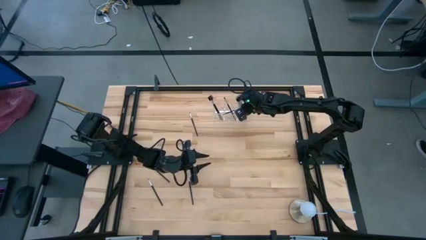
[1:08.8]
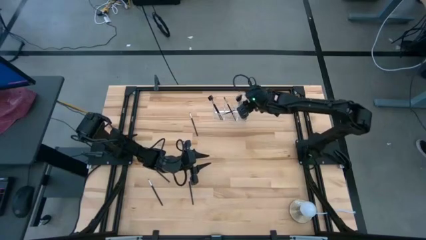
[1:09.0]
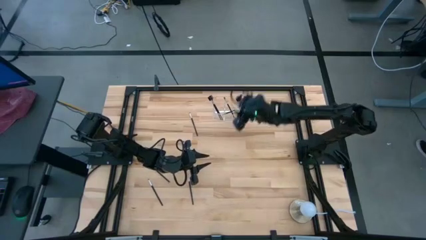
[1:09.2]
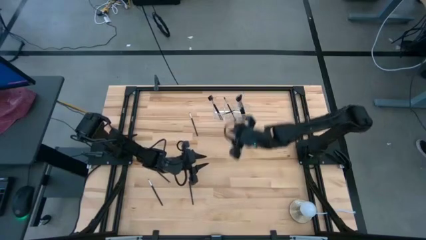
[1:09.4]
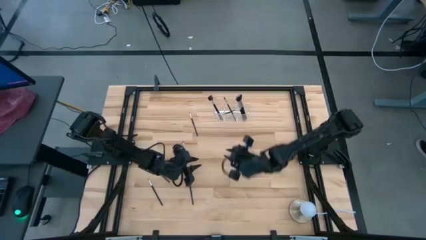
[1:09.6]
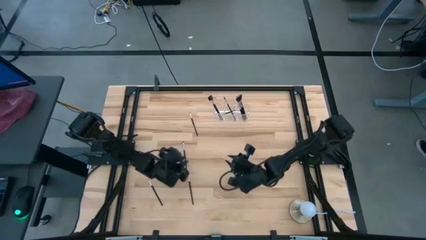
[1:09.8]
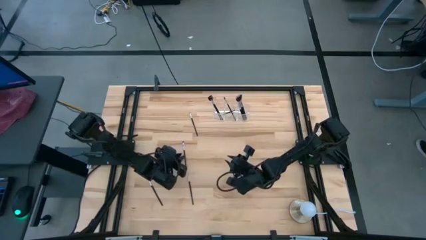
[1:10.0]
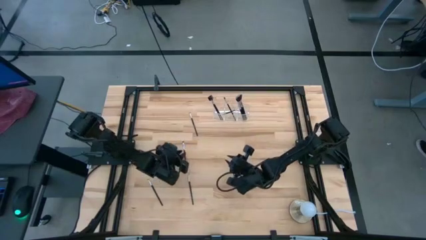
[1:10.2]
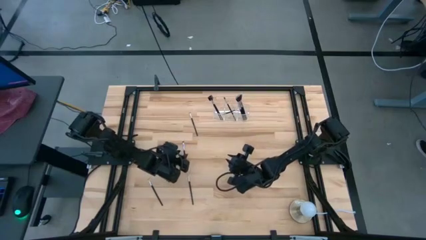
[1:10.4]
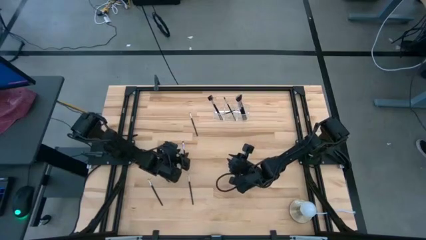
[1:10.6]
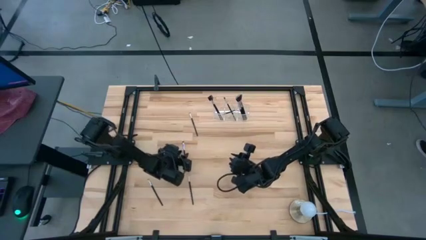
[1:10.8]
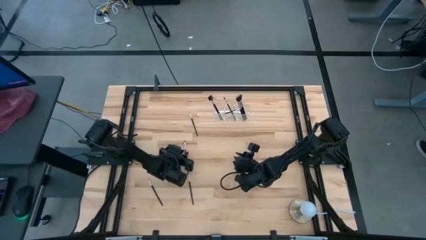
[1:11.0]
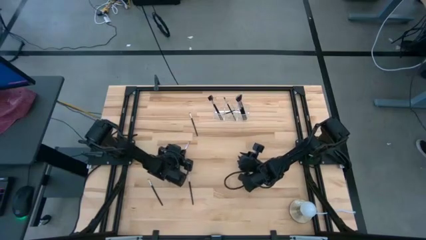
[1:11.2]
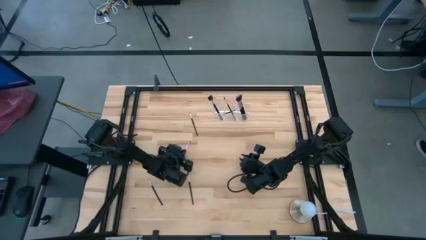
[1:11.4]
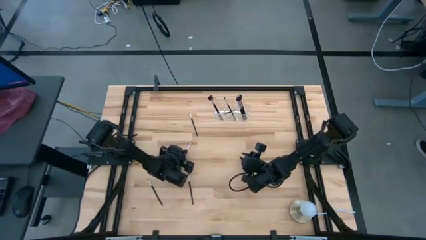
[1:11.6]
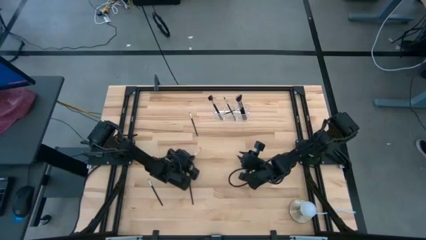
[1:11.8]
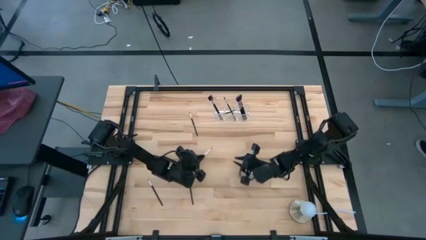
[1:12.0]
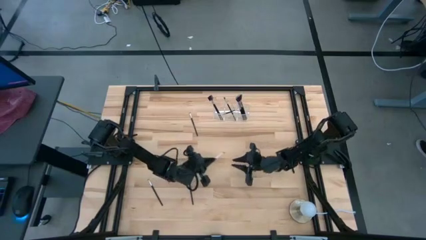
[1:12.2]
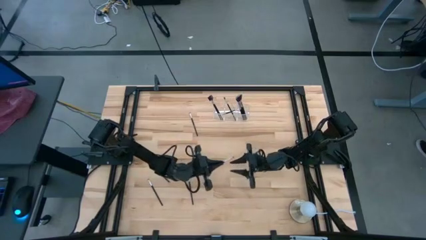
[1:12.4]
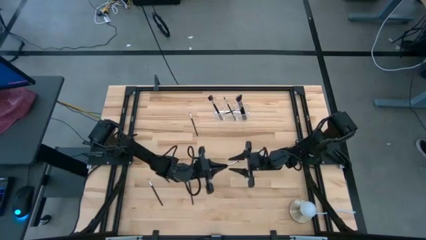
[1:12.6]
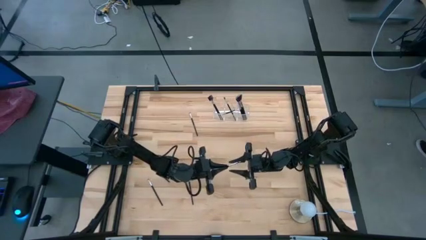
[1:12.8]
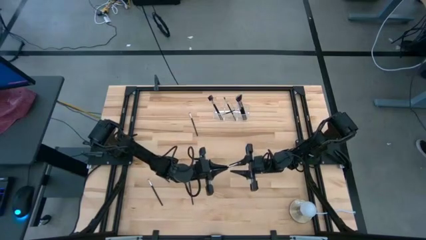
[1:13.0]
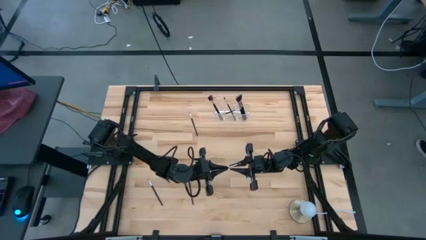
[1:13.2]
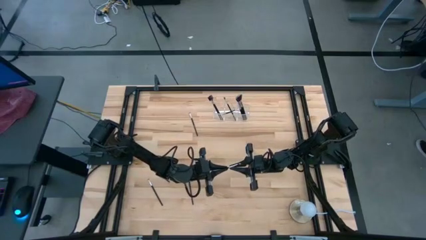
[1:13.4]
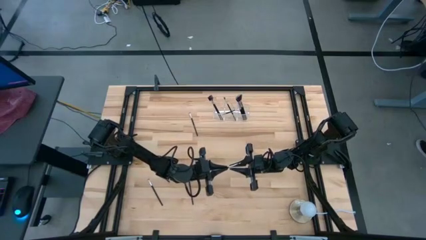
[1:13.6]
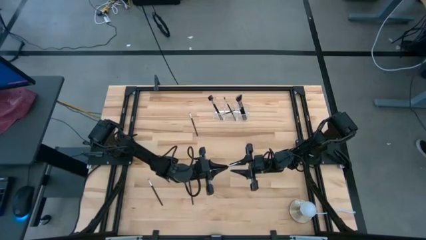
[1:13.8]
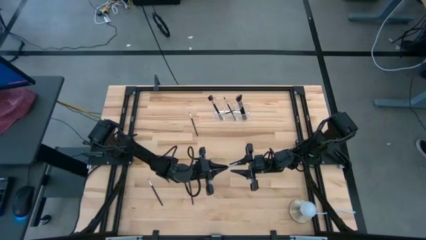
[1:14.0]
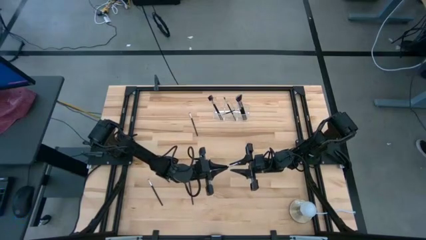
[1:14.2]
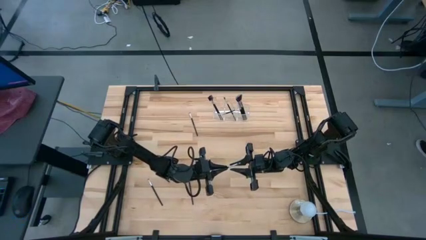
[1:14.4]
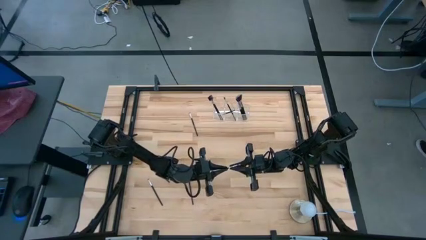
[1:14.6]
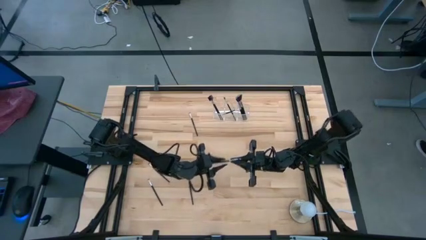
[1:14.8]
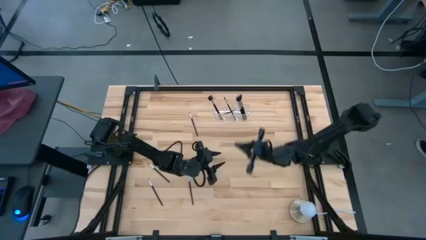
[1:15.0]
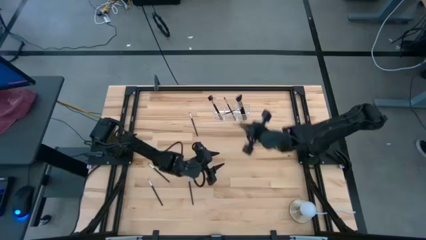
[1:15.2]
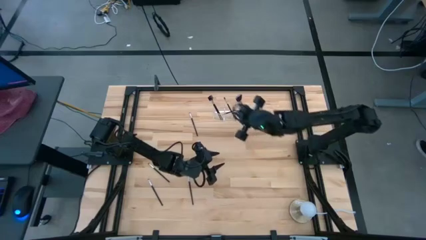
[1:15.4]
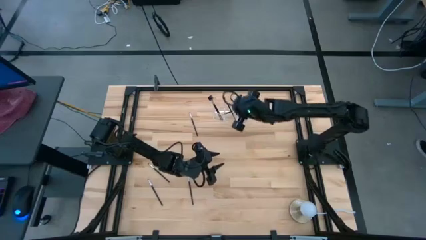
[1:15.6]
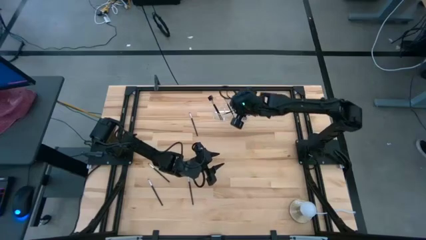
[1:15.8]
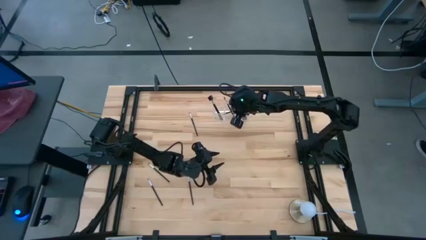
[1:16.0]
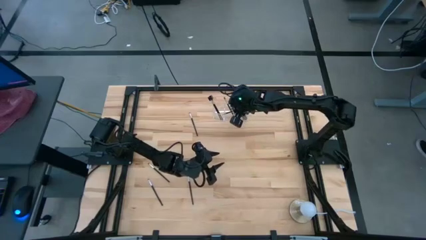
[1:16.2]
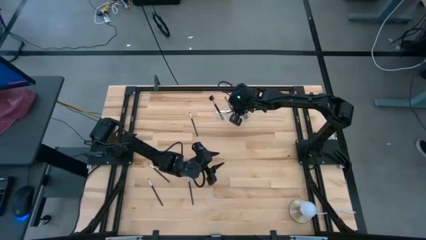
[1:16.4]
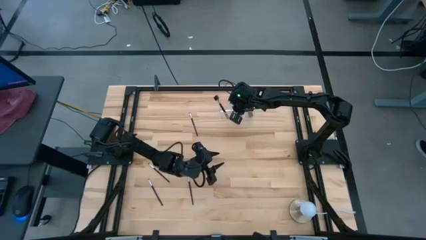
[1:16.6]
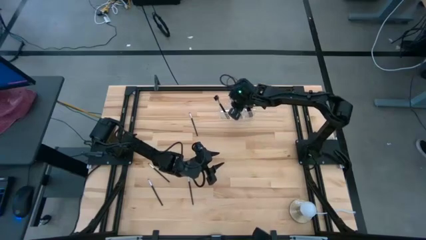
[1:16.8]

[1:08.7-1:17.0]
Task: Put items in baskets/containers
Put the black eyeshadow brush into the transparent organizer

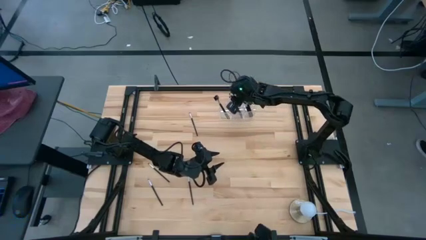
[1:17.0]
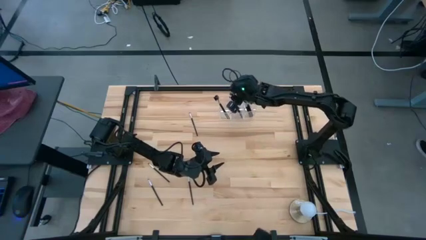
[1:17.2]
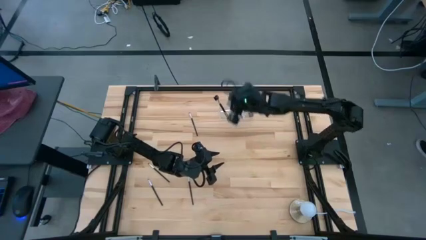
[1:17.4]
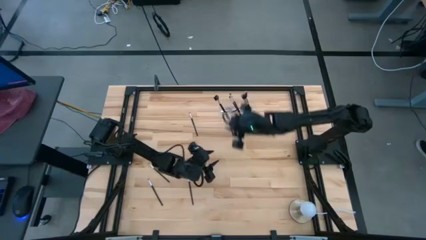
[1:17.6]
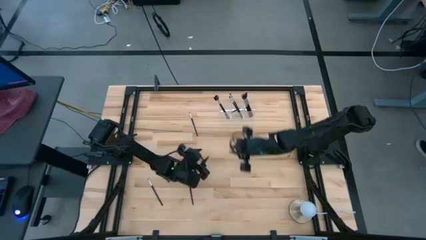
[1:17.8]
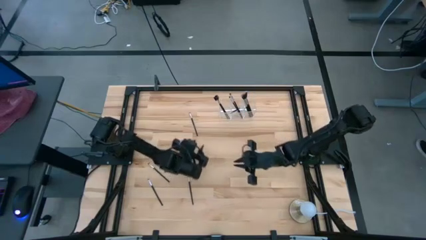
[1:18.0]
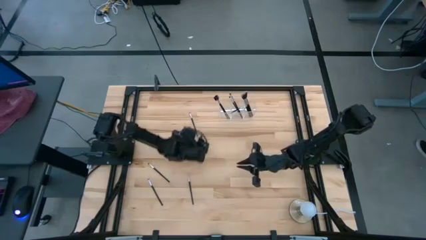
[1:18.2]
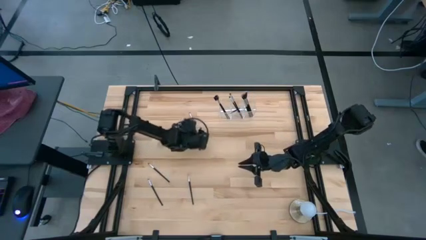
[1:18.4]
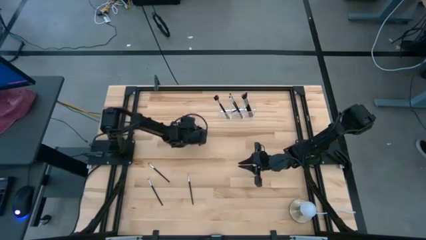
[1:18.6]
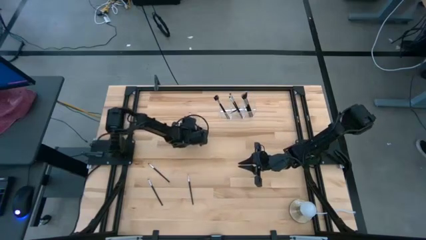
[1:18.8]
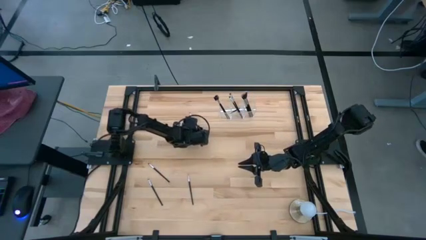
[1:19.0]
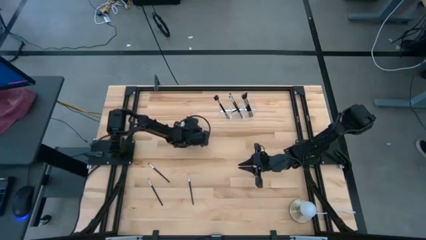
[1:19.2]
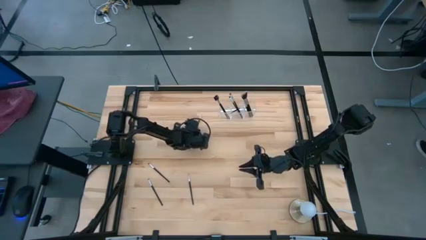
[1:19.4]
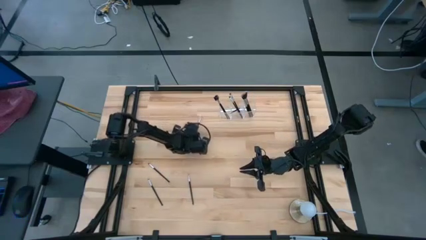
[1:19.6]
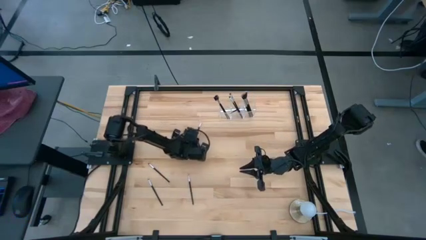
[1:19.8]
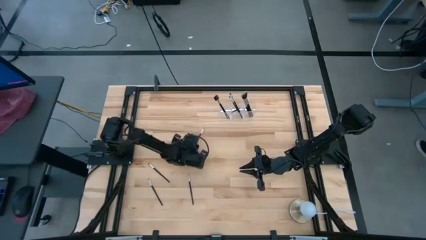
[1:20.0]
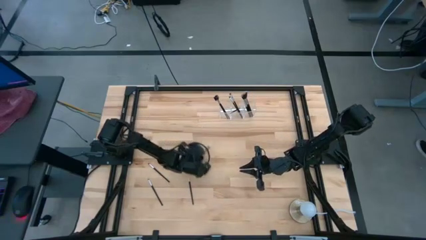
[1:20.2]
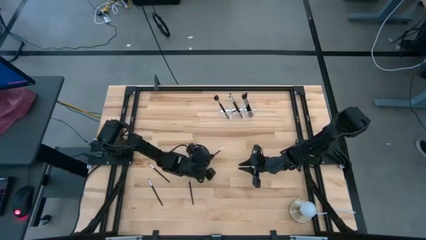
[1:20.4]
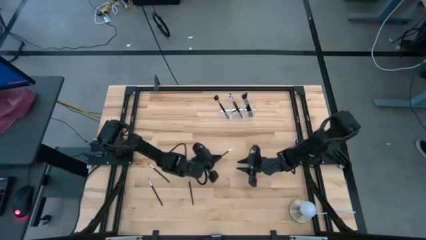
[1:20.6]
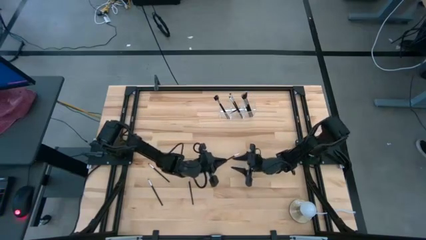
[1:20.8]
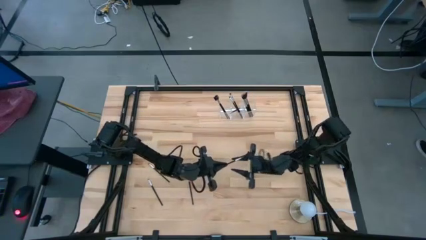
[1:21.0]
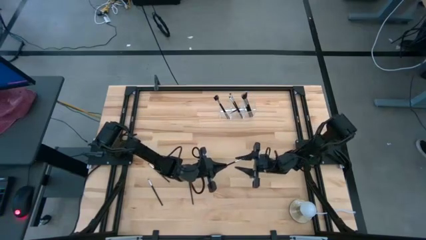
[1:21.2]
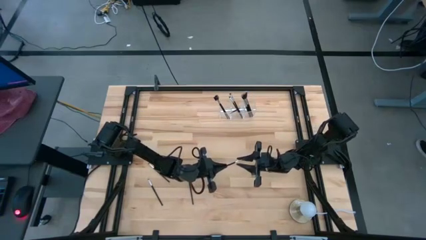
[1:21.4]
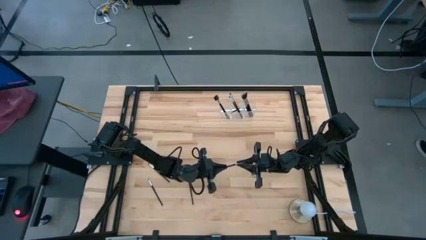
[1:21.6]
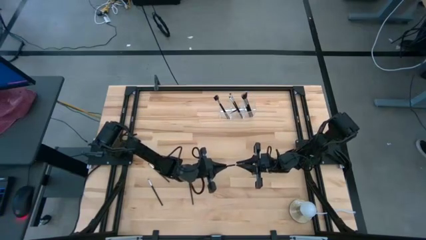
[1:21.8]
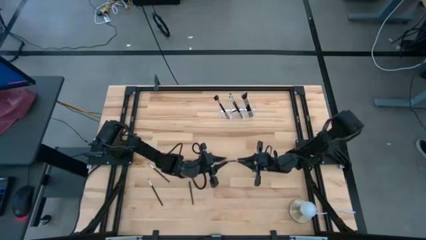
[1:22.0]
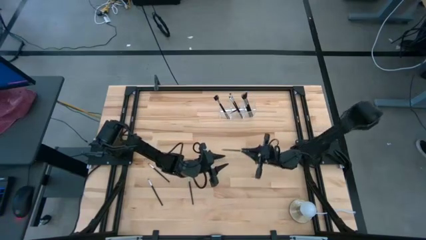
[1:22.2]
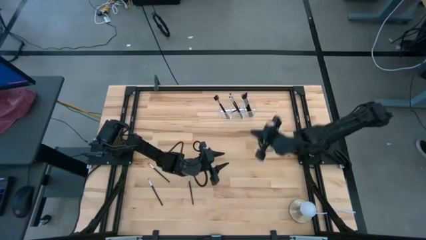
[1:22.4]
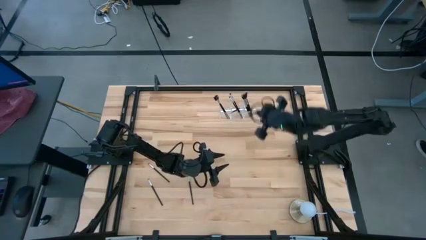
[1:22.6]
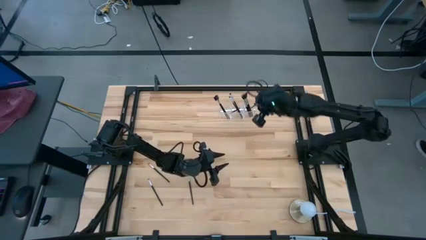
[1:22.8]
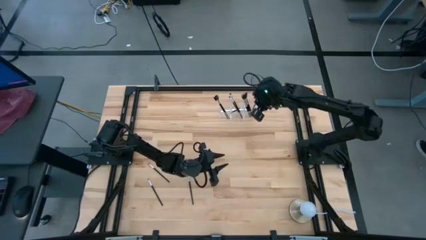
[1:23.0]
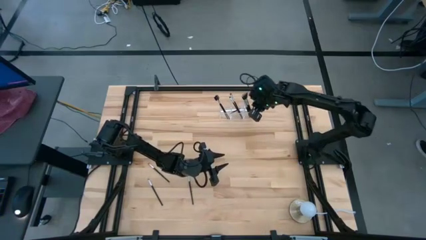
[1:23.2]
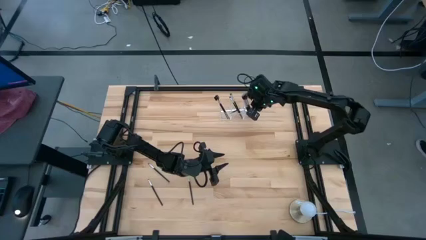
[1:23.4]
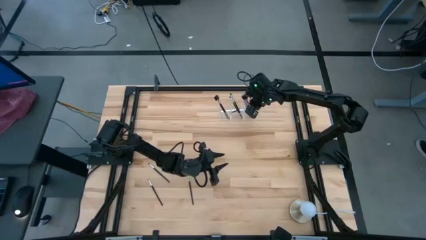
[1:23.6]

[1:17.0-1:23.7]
Put the black eyeshadow brush into the transparent organizer

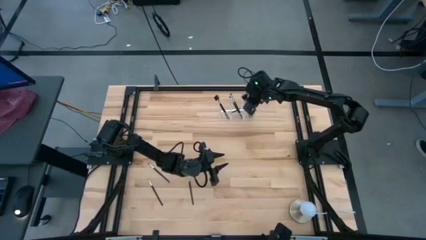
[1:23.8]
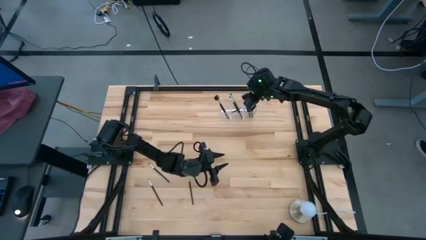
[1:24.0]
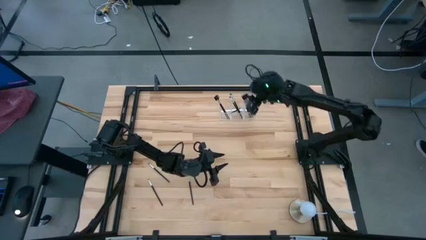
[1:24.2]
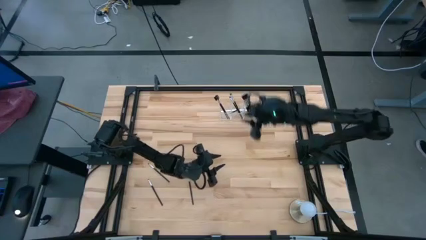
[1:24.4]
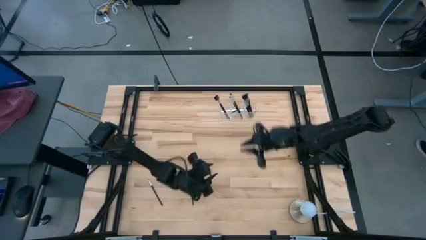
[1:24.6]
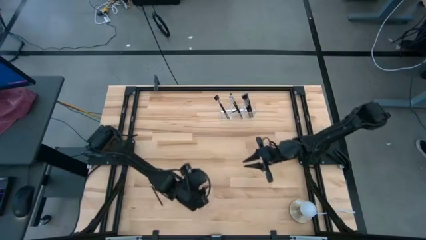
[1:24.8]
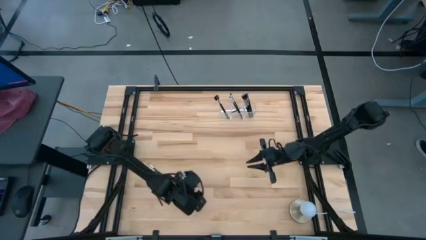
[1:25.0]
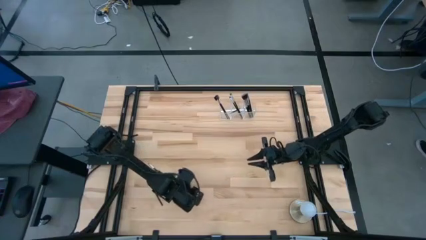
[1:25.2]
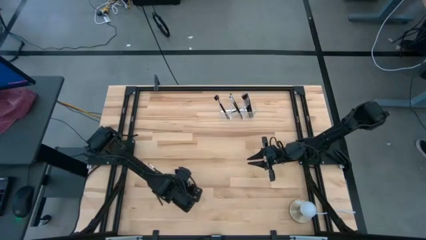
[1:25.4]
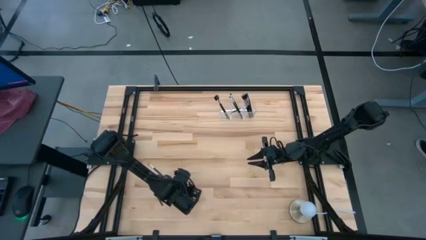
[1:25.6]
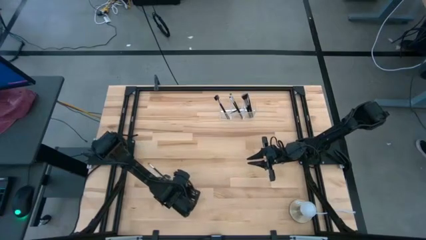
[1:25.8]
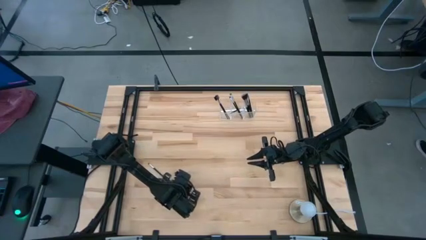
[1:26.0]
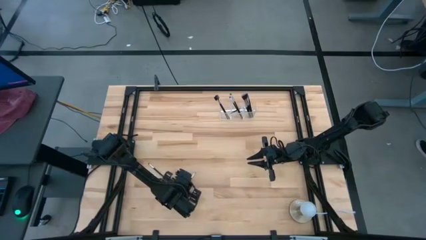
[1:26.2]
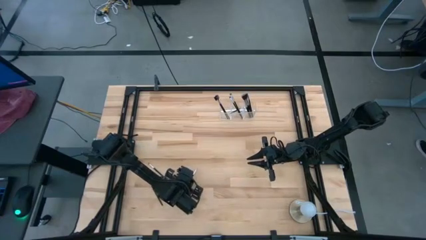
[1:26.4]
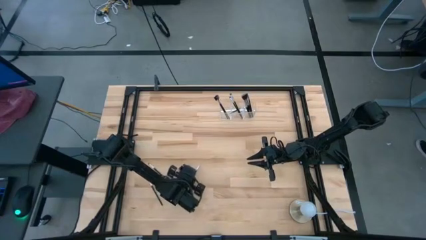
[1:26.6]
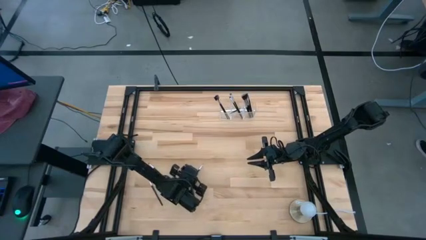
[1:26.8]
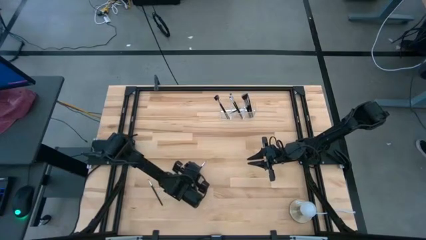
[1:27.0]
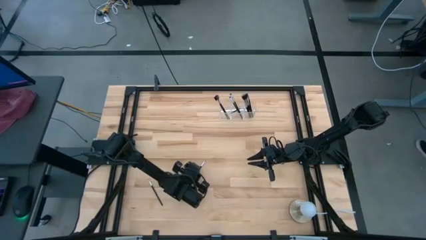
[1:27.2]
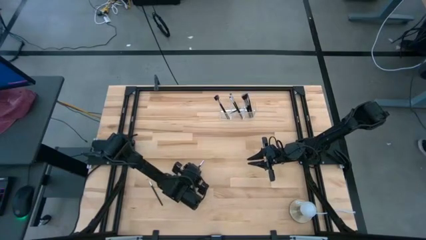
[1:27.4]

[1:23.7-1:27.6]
Put the black liner brush into the transparent organizer
